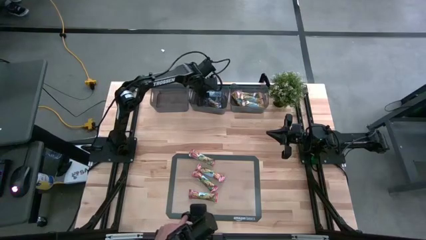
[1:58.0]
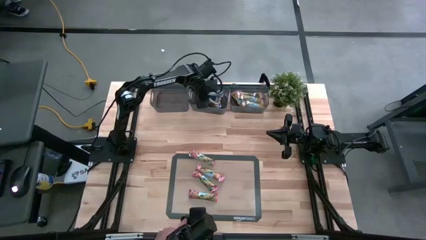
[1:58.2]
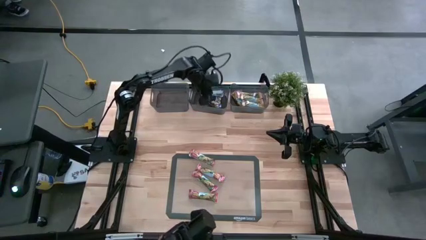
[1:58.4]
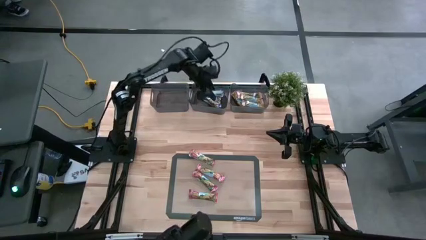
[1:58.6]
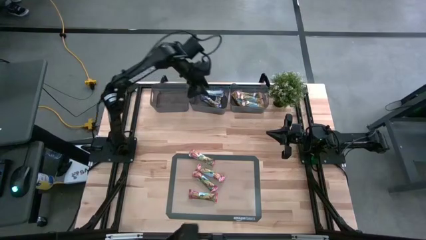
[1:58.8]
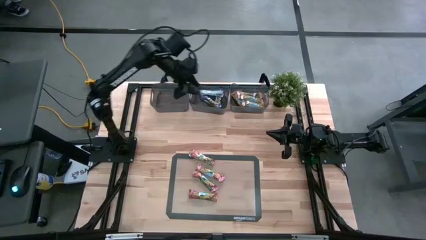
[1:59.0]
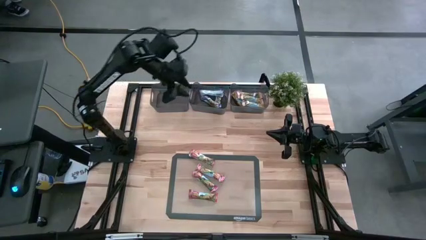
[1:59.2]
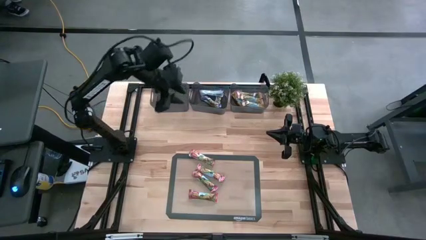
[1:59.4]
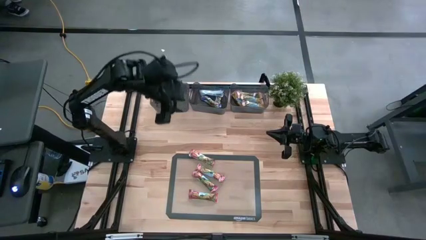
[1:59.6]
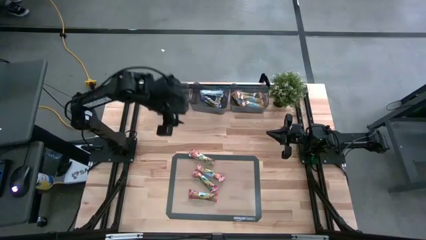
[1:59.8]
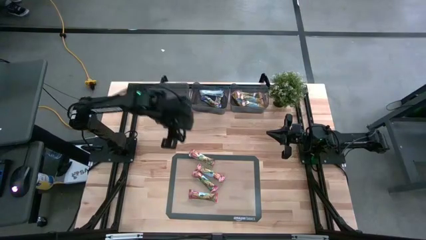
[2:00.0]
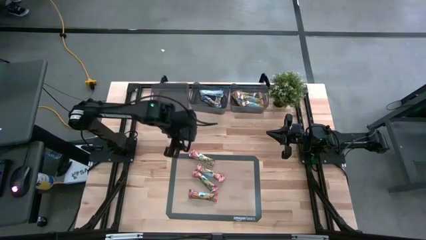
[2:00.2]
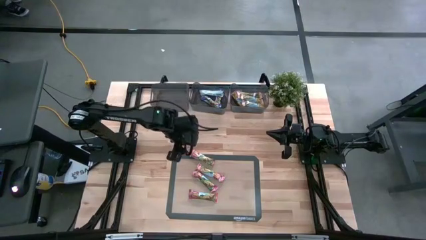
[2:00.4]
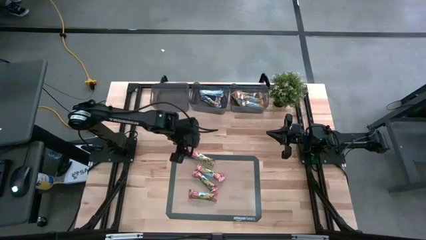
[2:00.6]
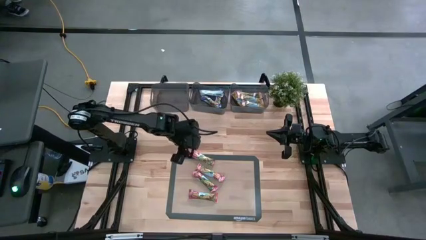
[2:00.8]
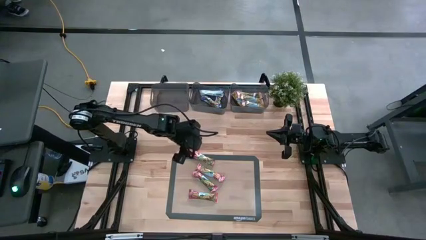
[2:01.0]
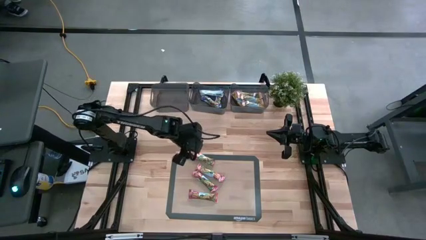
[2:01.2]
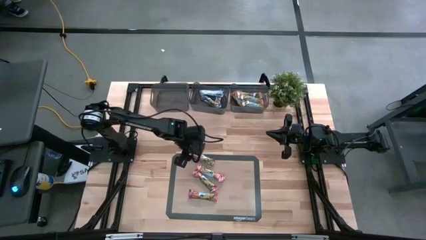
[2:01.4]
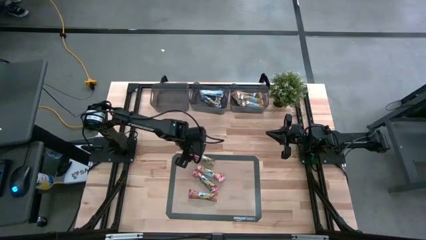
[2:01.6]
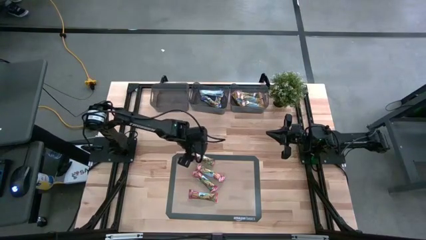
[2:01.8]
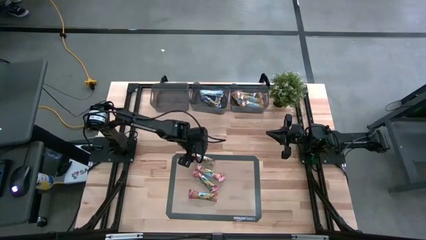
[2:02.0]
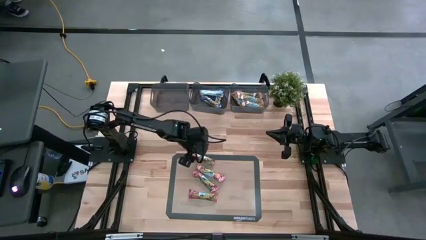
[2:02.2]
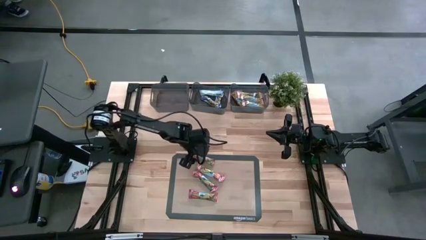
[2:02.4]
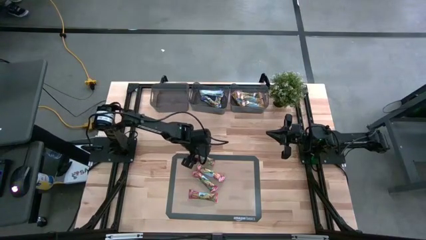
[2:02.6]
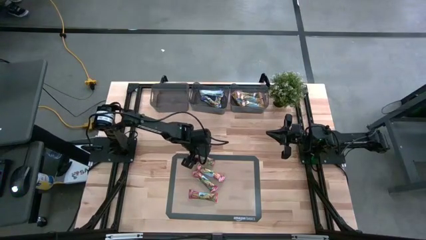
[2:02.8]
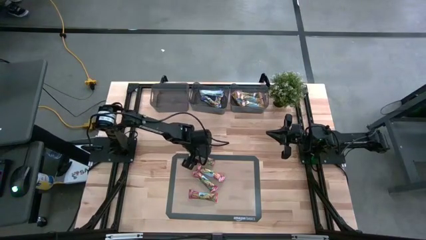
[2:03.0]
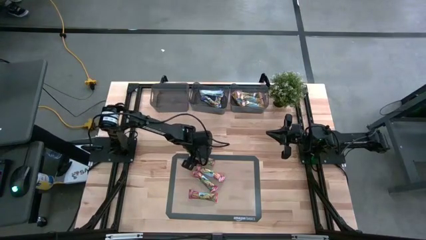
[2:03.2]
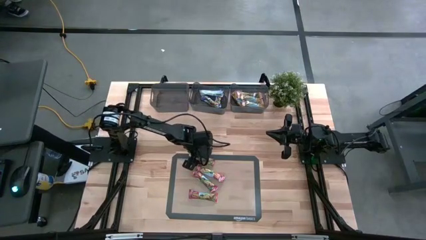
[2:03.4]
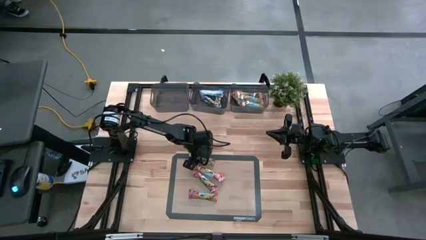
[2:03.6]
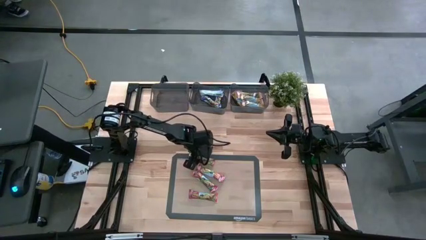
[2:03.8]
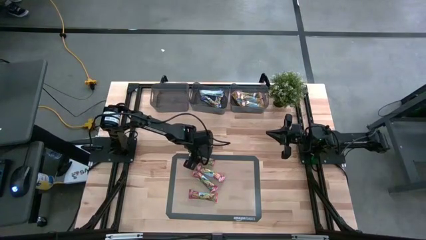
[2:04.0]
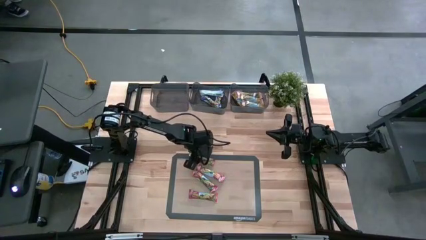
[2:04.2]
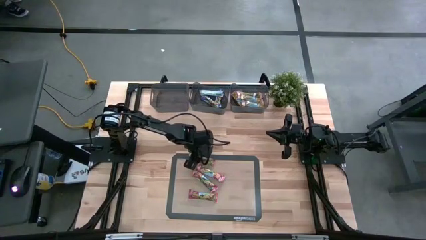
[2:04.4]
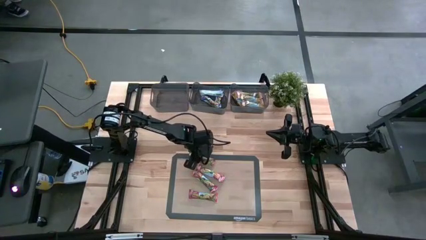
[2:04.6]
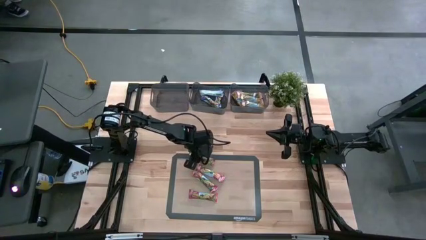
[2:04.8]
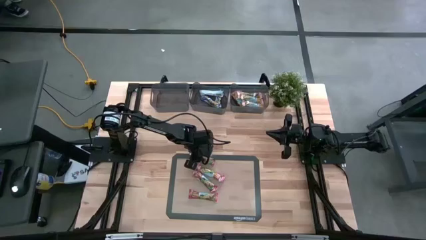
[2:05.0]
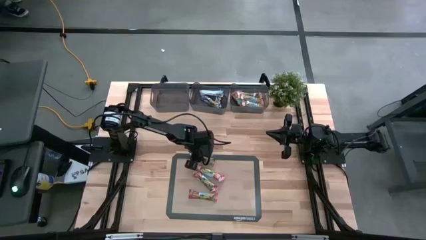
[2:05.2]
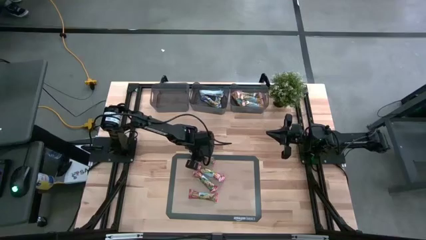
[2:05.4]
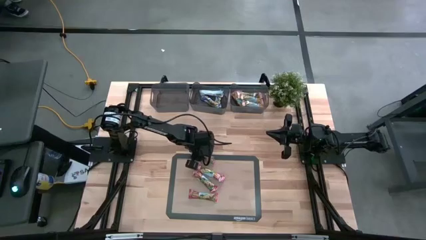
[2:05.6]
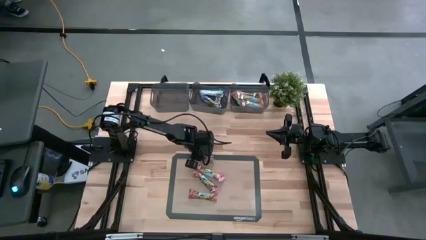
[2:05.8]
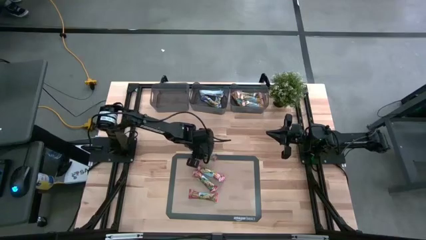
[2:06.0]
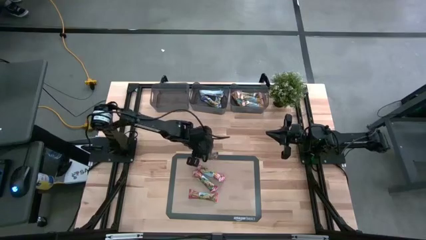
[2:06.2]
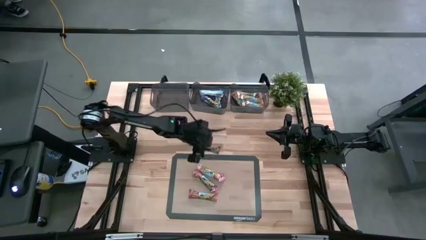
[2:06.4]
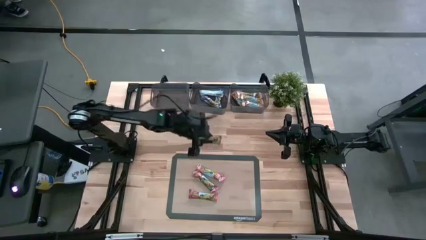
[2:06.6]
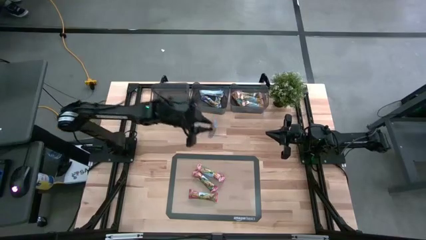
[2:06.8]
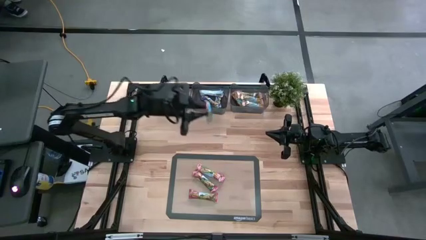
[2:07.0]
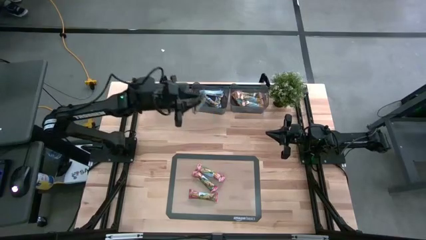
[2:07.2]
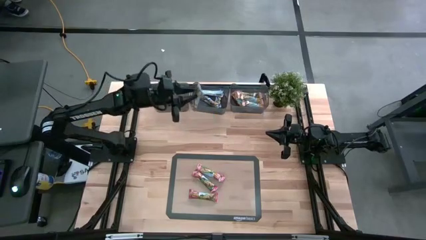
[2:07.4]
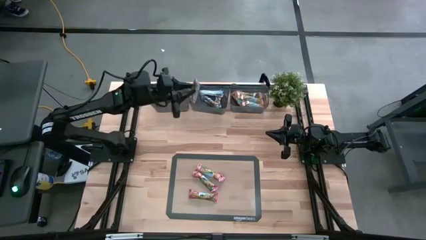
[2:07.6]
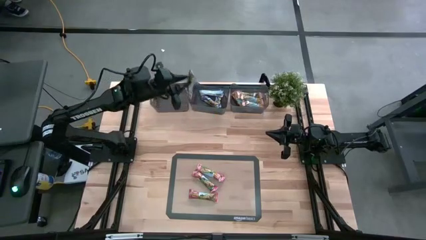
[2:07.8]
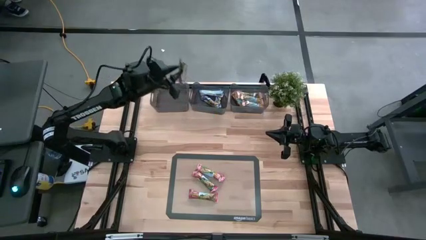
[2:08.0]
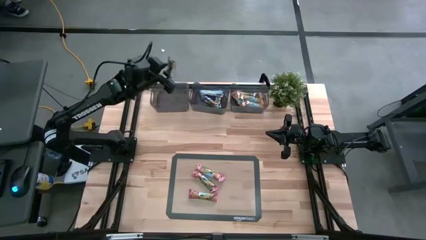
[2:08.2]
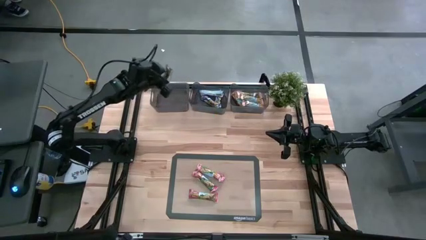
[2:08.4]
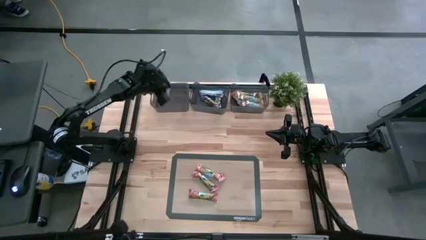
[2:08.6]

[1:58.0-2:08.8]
Task: Pick and place Granola Bars by type
Put the red granola bar into the left black bin

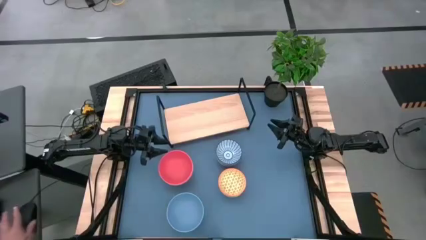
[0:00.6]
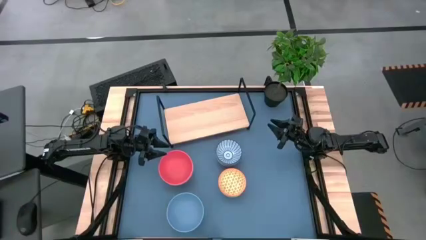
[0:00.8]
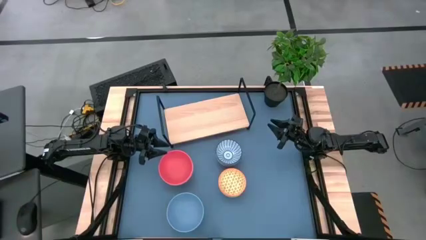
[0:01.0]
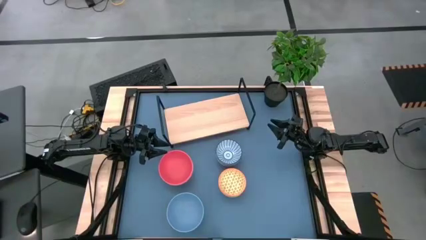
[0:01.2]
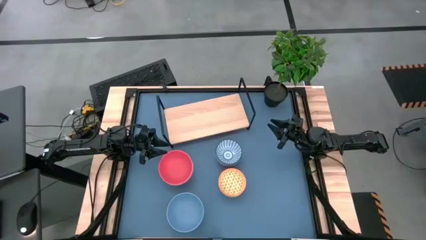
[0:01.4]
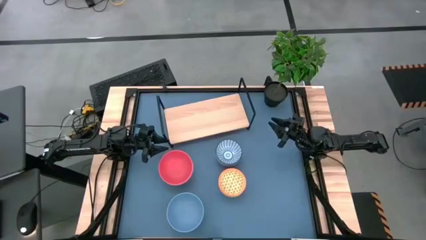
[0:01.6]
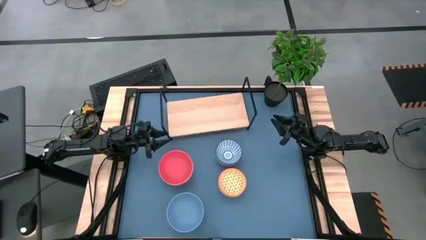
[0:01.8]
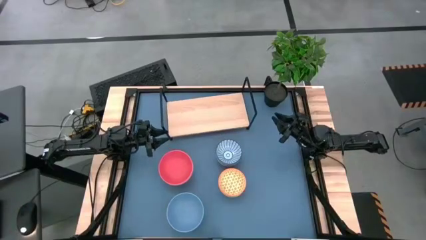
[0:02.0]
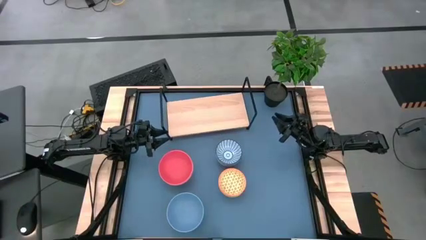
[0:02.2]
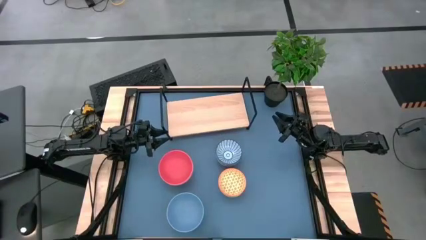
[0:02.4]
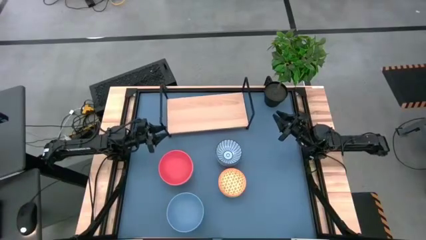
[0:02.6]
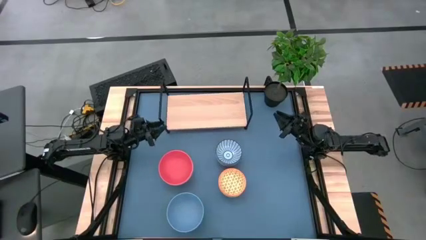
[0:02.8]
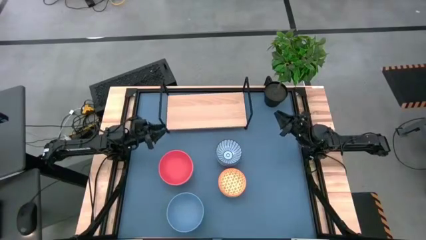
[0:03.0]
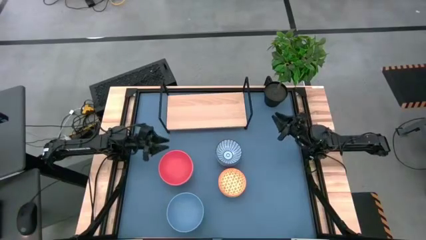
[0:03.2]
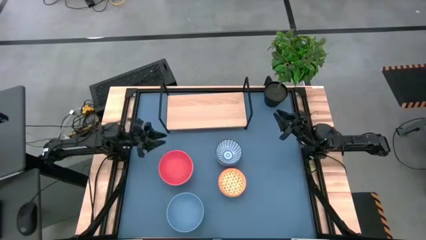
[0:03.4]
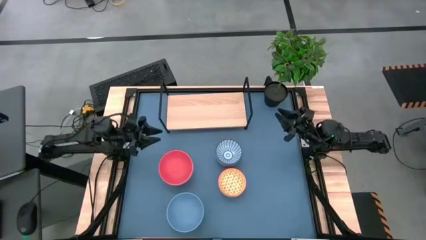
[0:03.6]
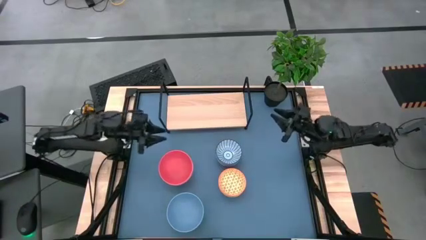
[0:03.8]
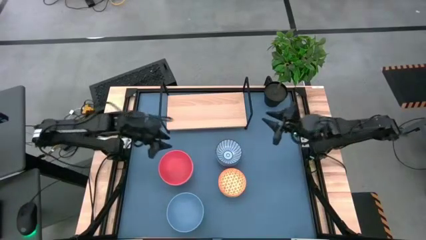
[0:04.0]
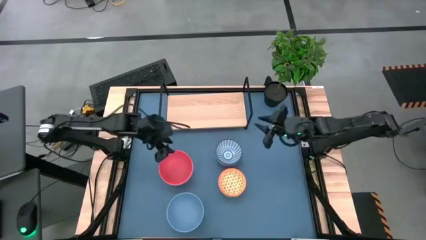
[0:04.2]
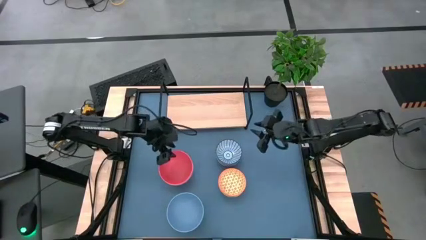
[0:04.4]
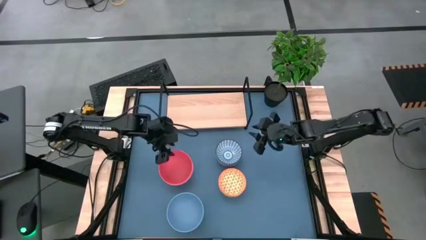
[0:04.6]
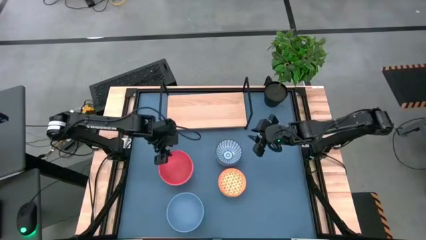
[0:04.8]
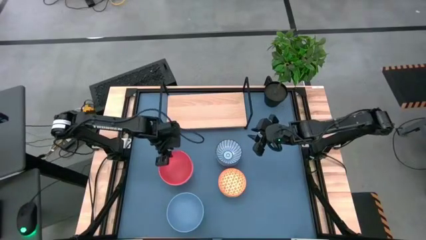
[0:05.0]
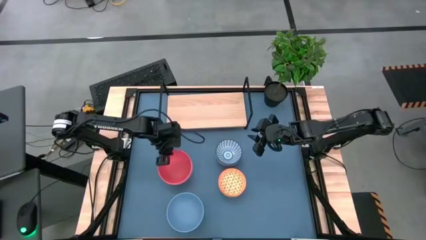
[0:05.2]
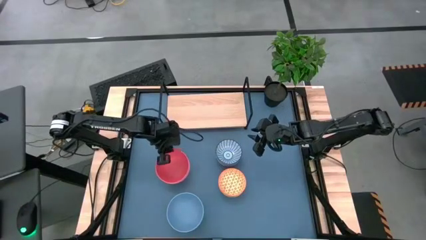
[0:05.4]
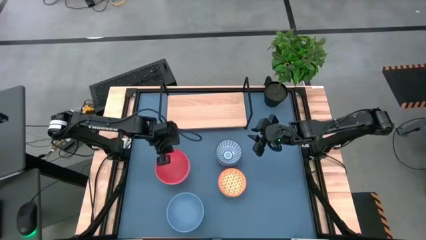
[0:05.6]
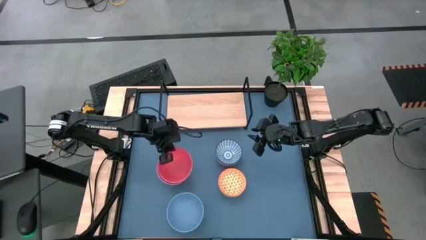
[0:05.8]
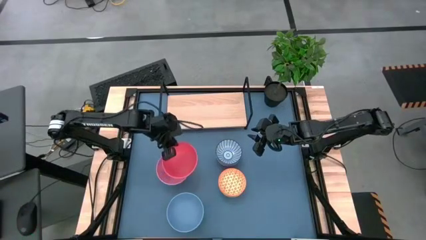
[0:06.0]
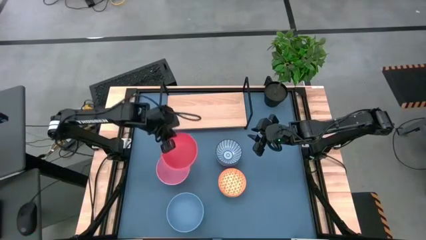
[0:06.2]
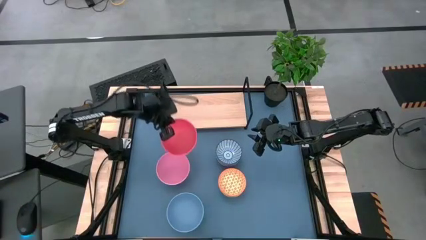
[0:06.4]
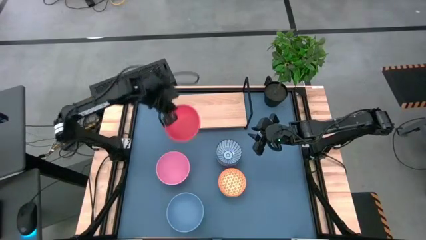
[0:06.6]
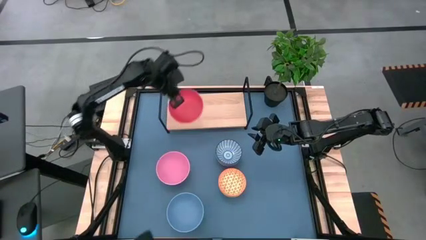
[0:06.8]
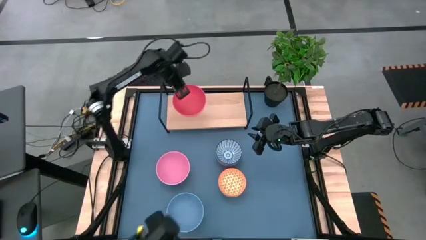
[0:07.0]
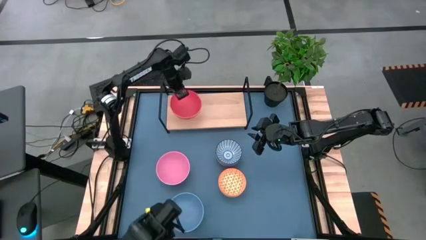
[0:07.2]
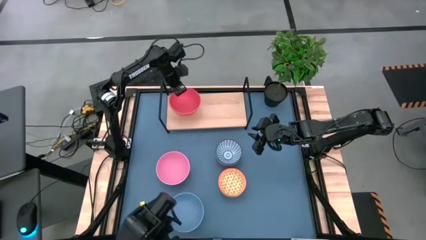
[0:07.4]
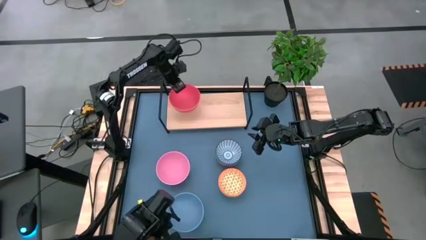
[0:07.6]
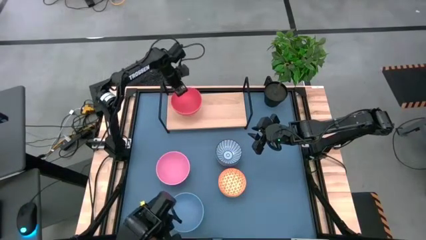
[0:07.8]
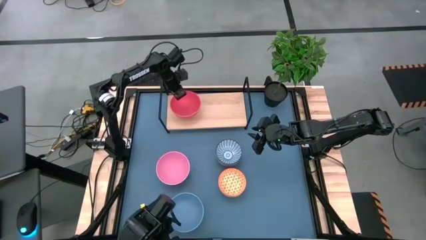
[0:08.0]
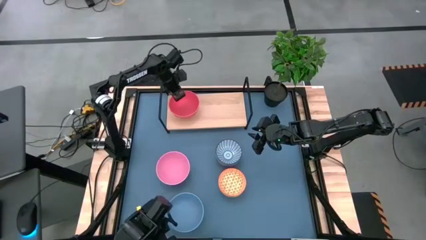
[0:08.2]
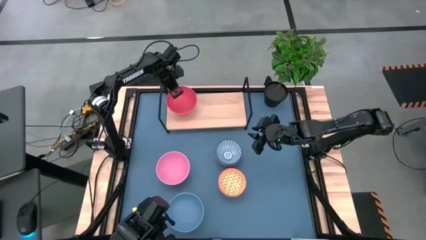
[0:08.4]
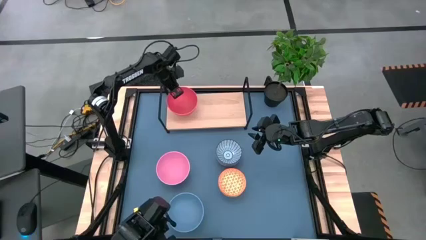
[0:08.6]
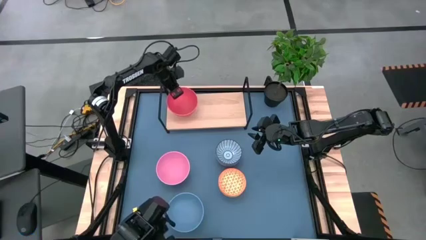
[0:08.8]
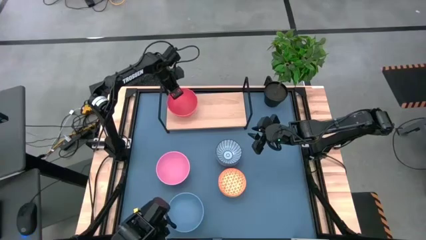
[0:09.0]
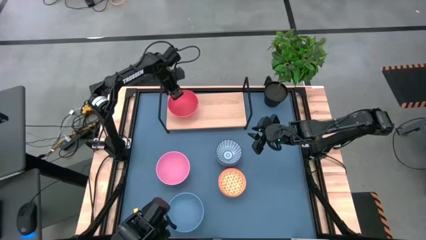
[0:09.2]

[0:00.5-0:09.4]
Task: Place and stack bowls onto a shelf
Put the orange bowl on the shelf
